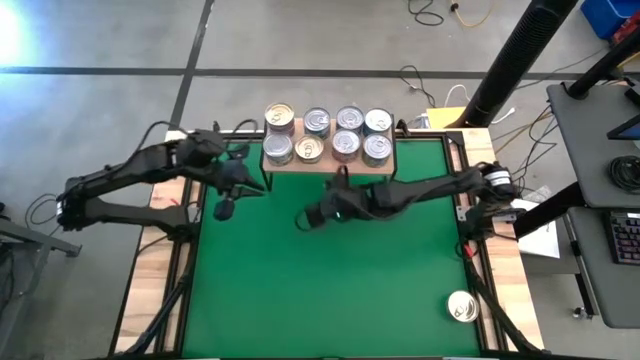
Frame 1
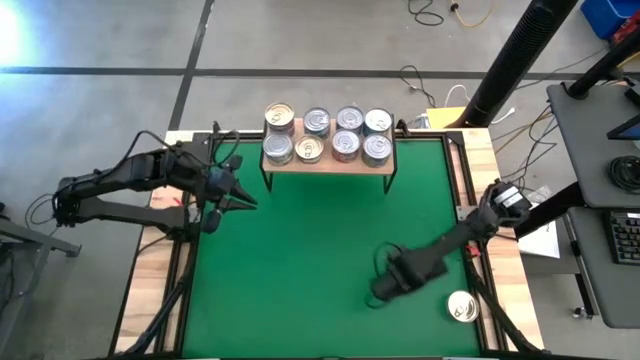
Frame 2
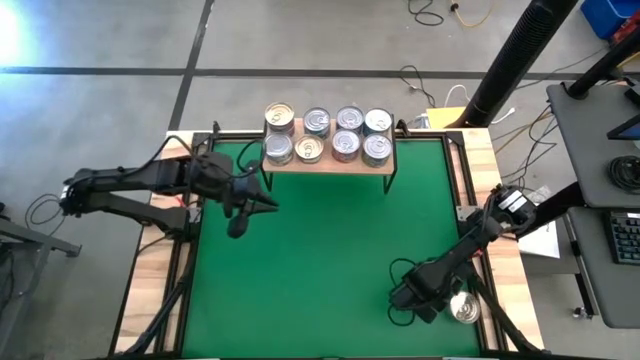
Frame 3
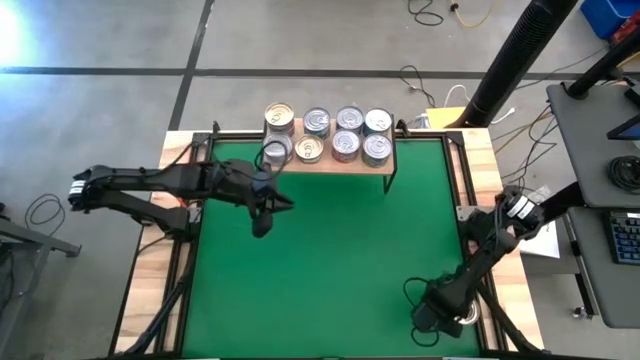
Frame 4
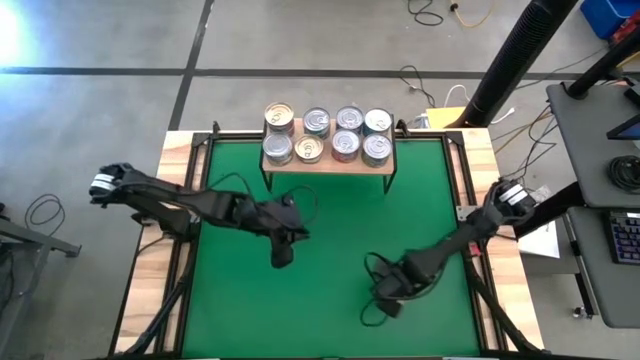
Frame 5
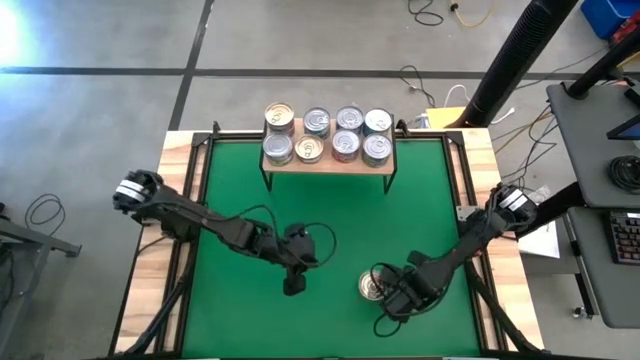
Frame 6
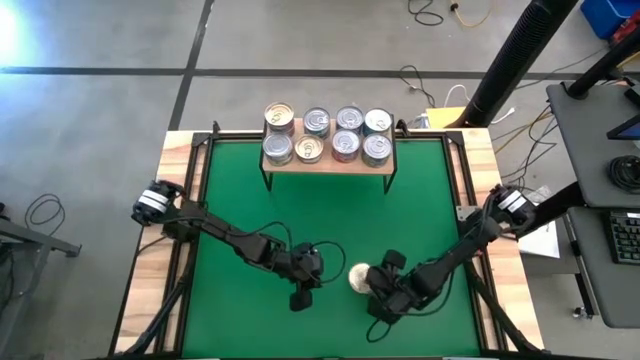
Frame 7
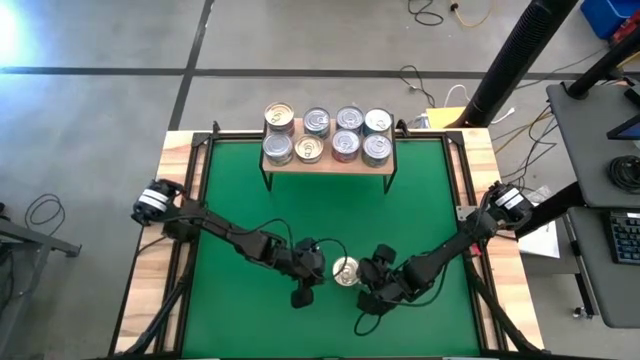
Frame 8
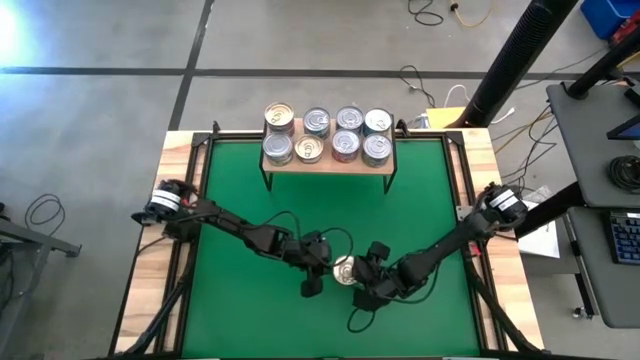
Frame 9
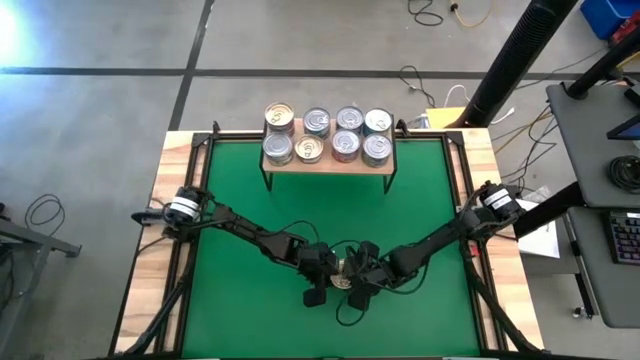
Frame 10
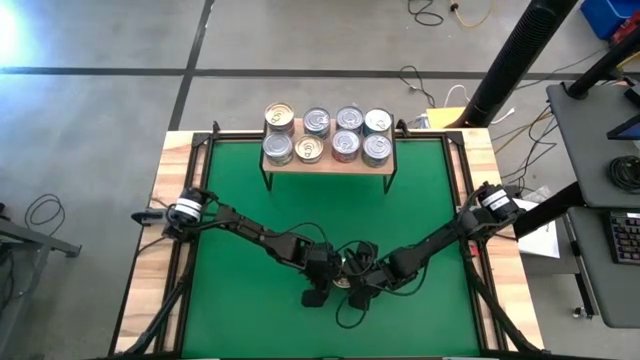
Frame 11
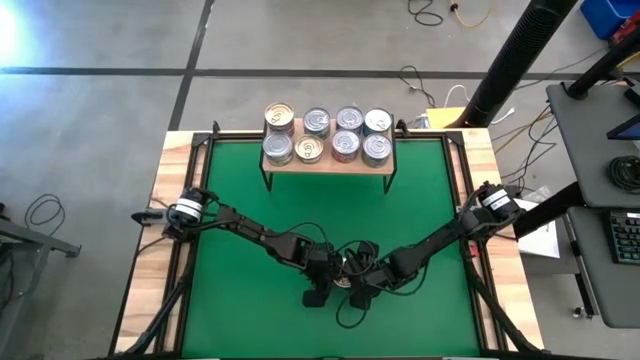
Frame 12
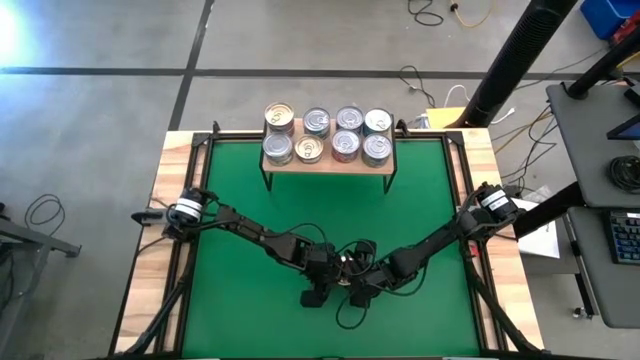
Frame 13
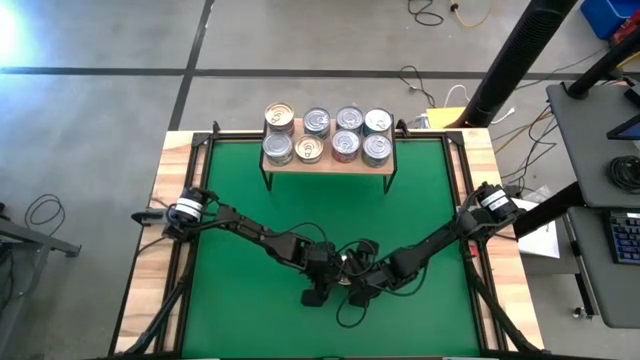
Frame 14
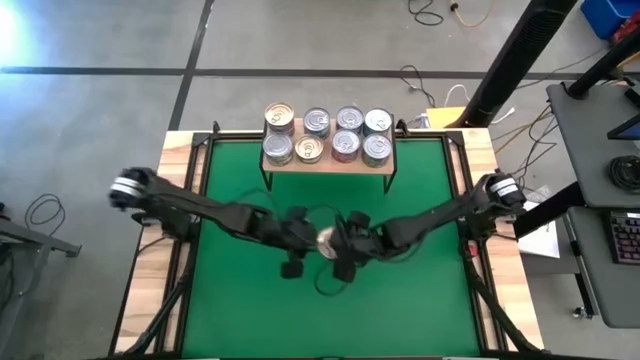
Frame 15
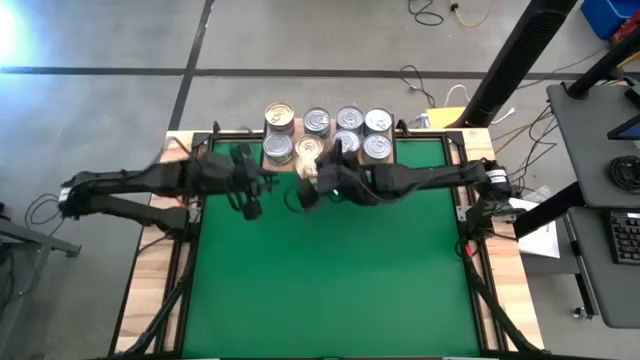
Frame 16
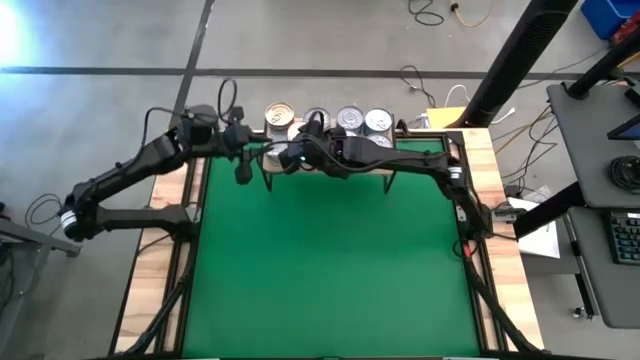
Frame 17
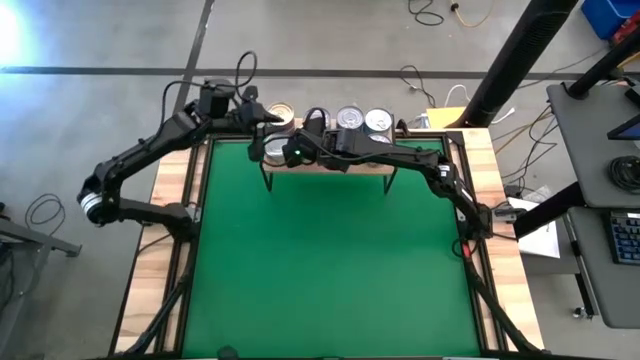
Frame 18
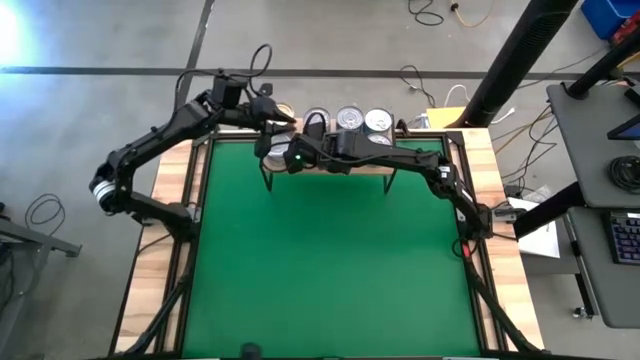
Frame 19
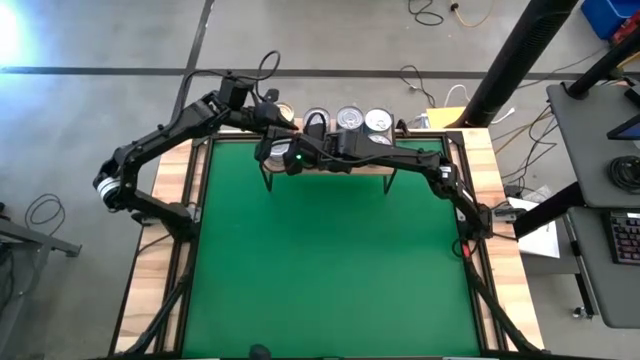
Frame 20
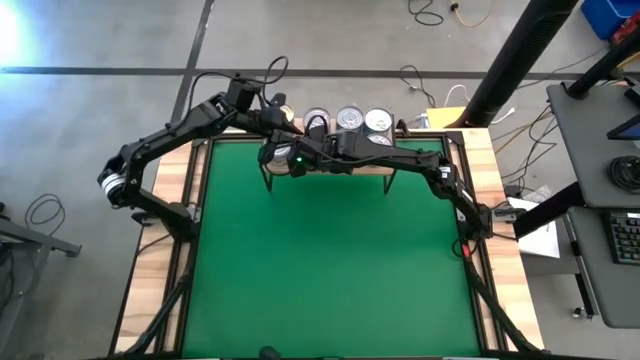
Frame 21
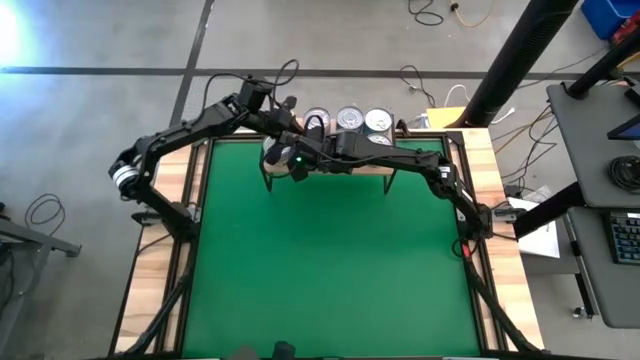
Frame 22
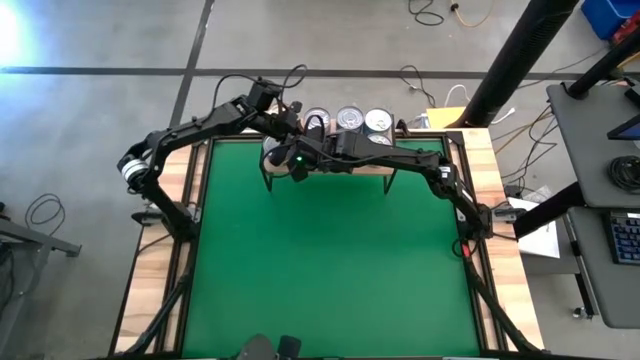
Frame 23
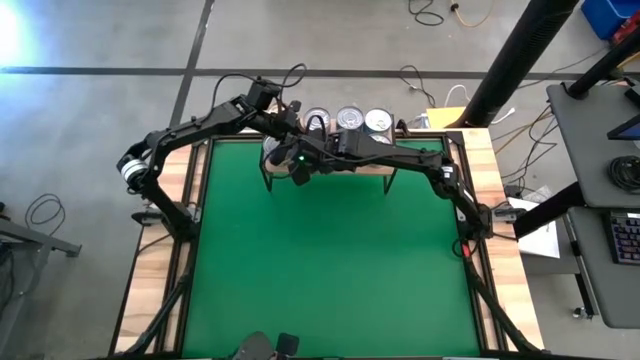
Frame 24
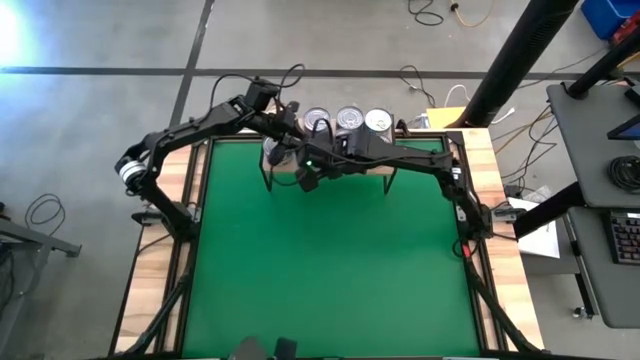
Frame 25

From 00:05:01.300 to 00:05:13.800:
Task: Stack canned seafood by type on shelf
Stack the blue pink tuna can on top of the blue pink tuna can on the shelf

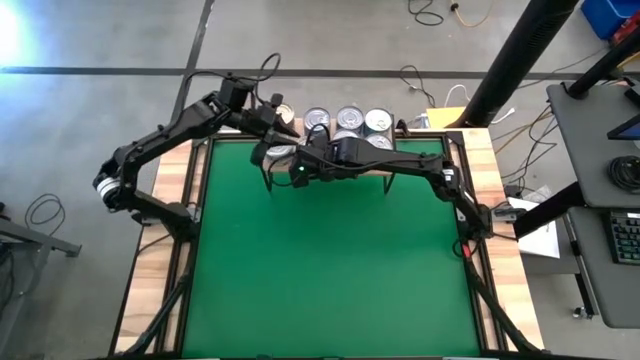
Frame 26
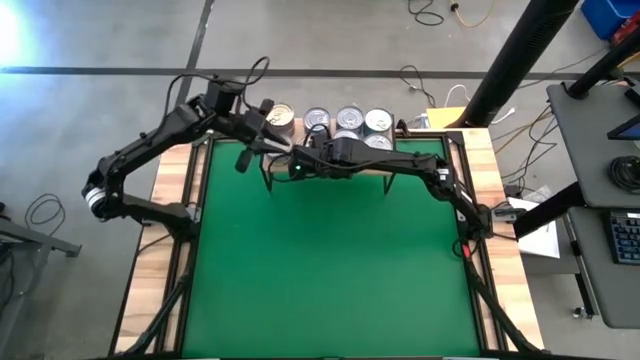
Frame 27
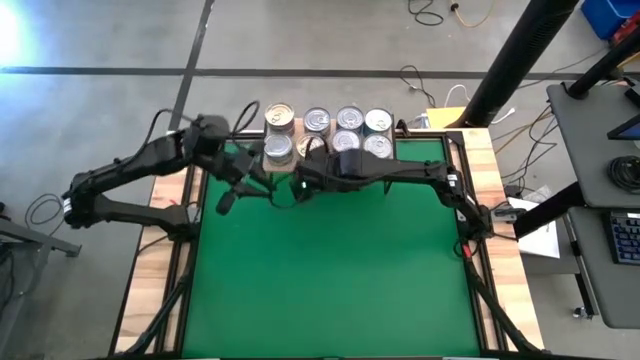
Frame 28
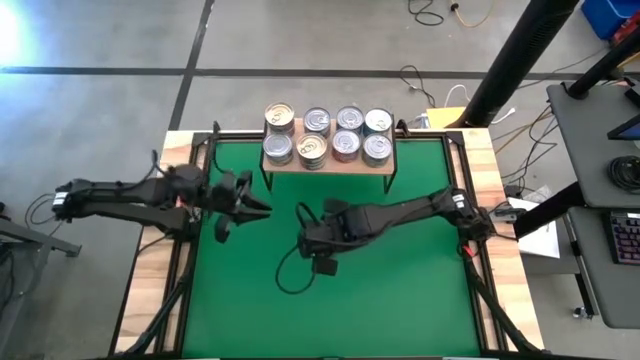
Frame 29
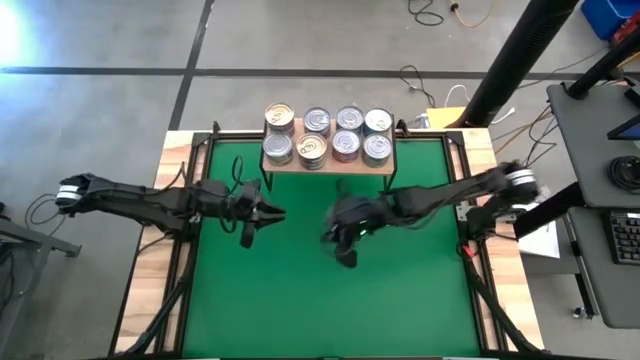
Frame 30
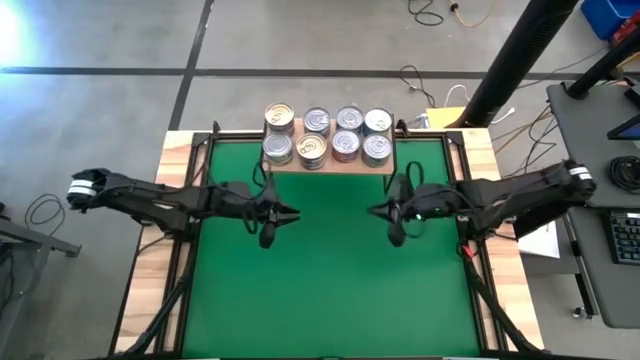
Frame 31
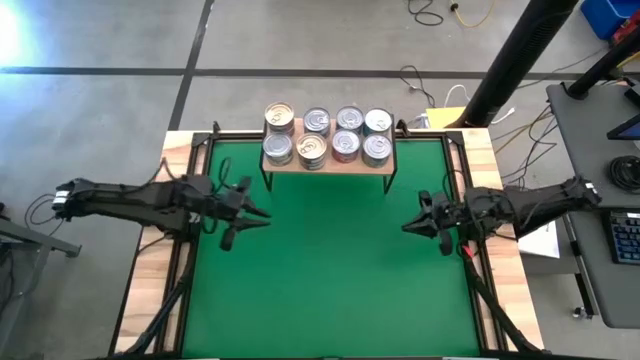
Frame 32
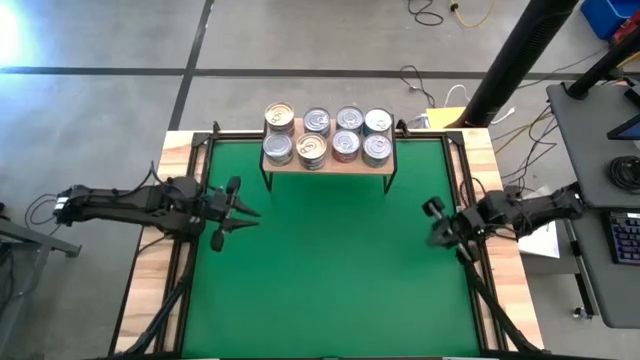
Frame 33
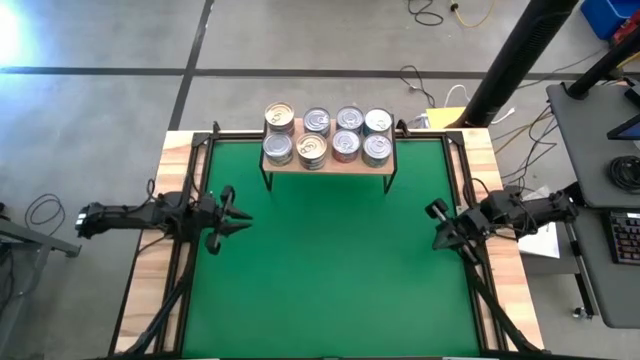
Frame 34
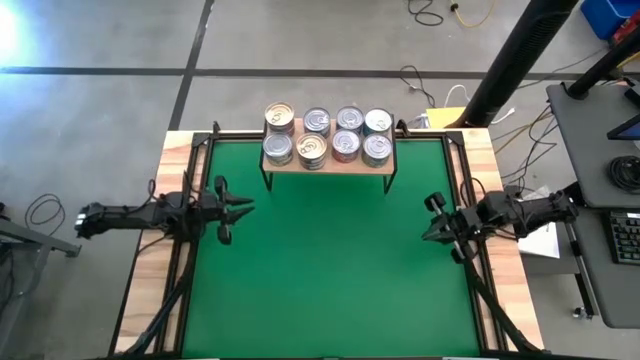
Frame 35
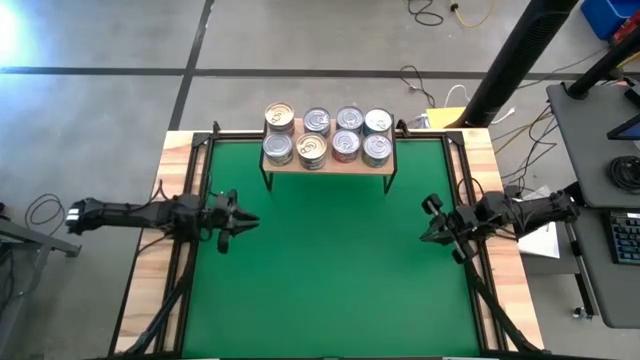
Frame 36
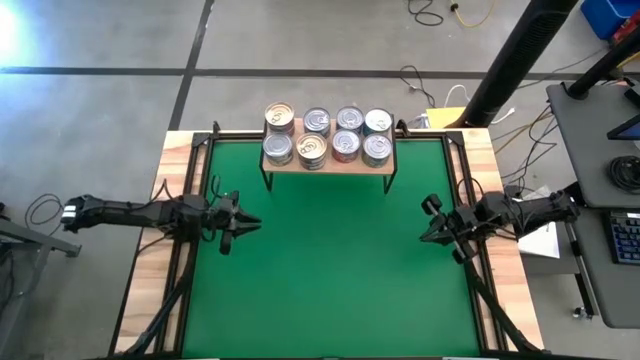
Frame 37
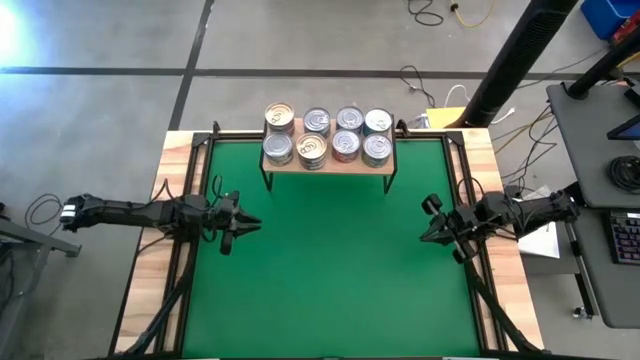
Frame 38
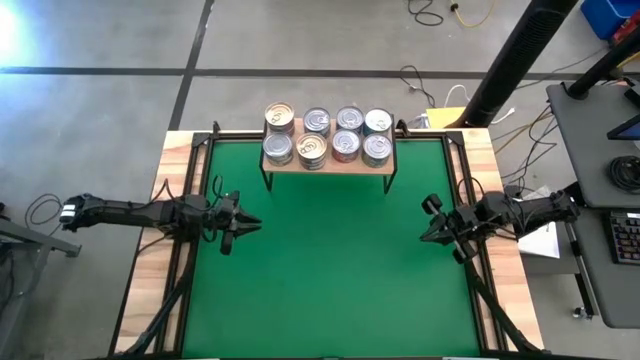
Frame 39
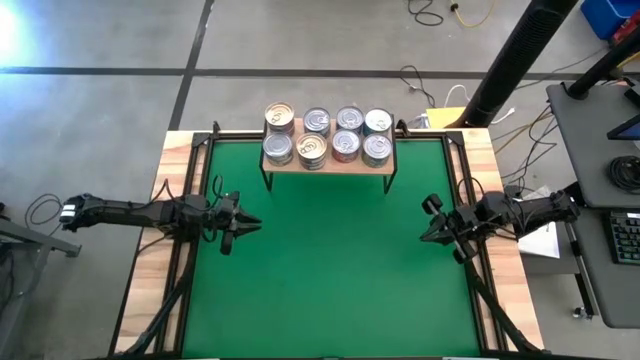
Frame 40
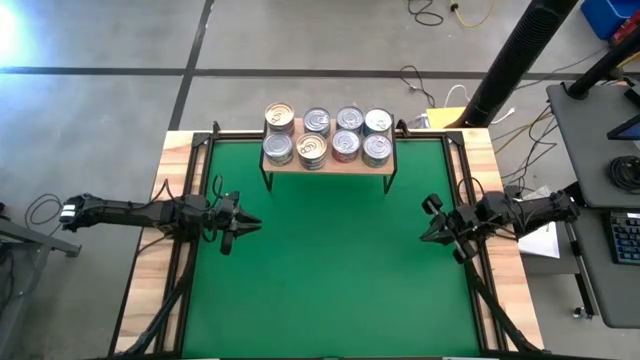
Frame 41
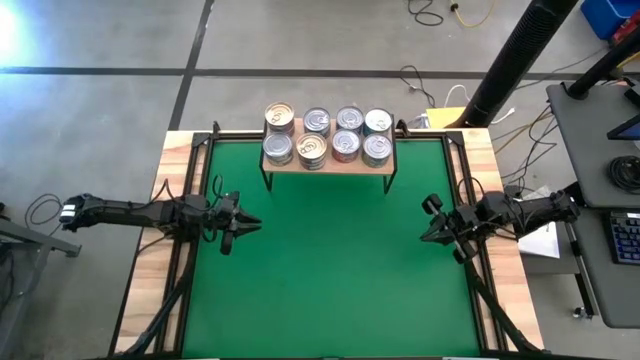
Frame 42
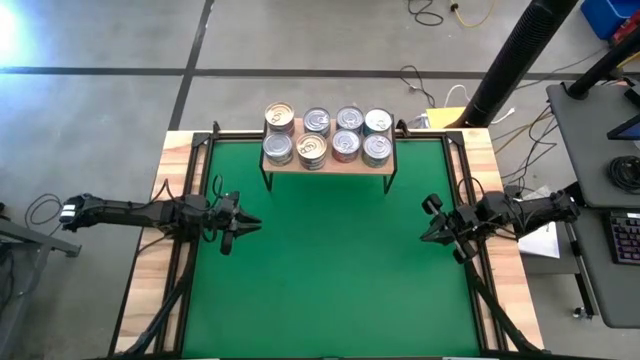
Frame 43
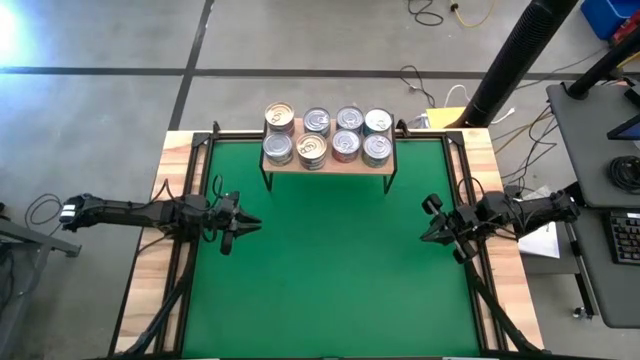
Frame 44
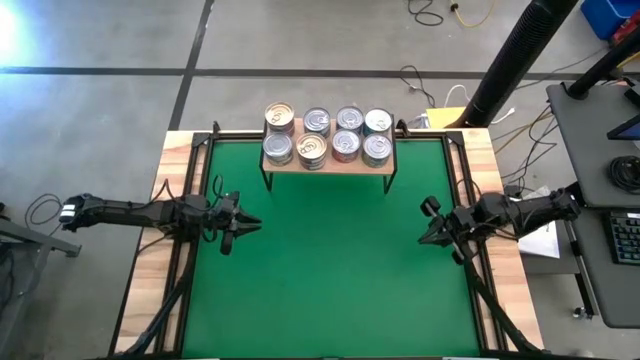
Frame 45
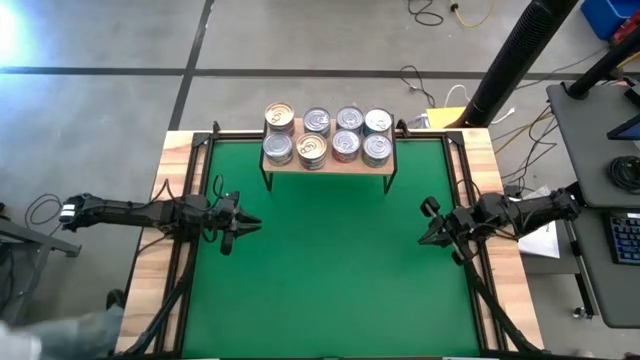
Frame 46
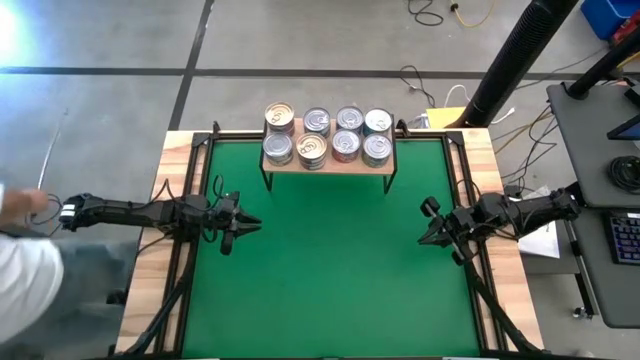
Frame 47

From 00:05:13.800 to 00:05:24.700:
Return to Home Position
